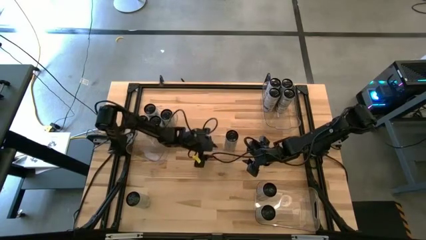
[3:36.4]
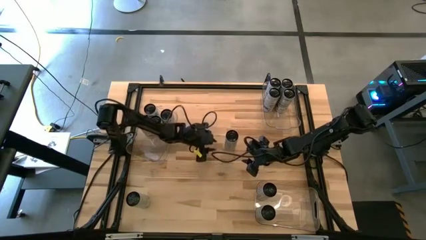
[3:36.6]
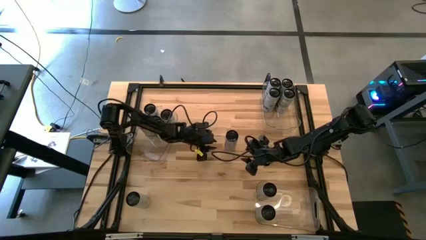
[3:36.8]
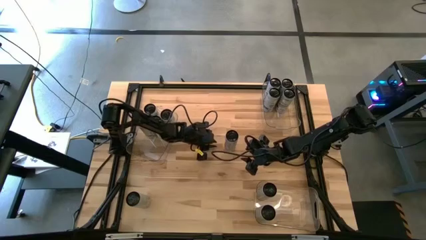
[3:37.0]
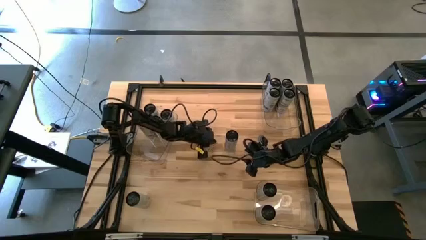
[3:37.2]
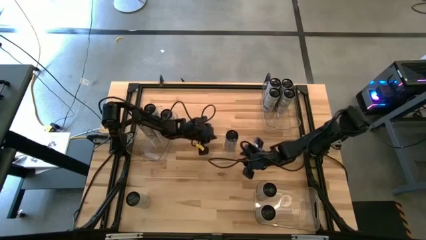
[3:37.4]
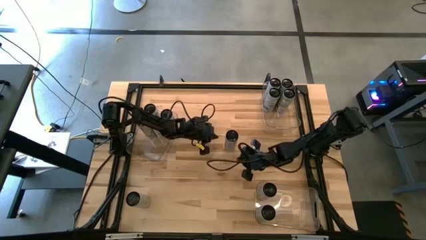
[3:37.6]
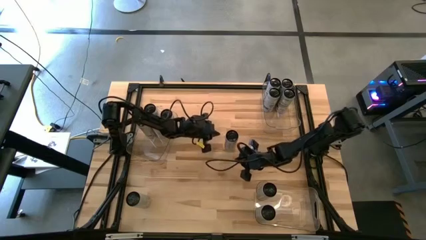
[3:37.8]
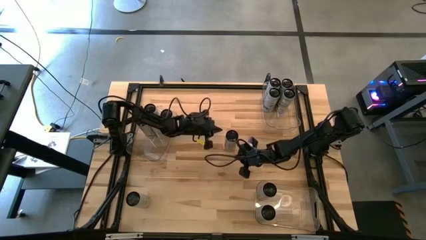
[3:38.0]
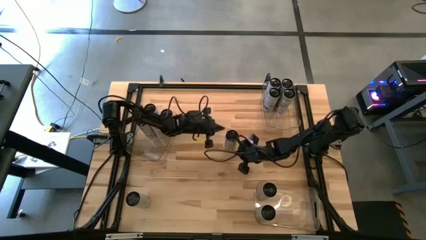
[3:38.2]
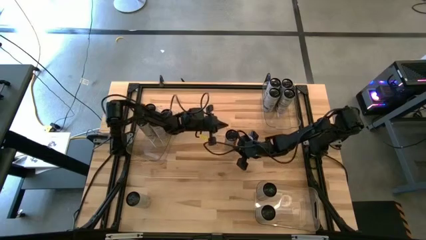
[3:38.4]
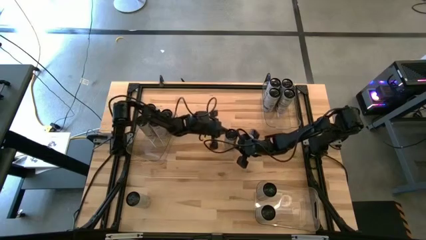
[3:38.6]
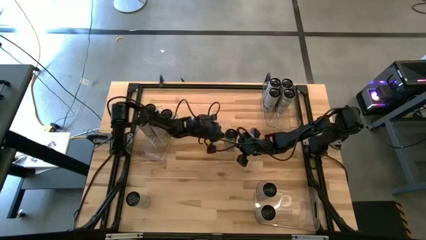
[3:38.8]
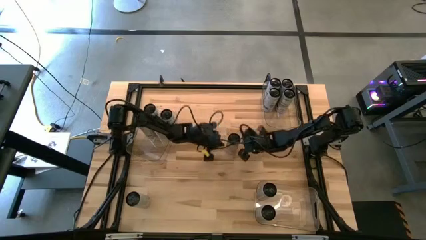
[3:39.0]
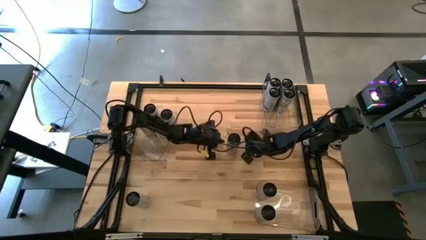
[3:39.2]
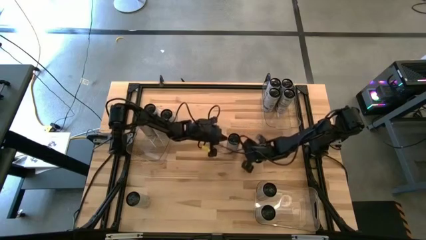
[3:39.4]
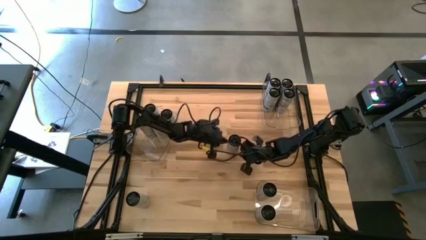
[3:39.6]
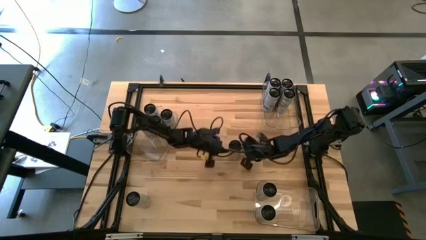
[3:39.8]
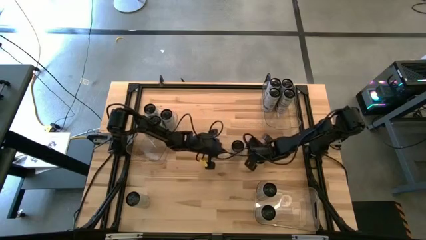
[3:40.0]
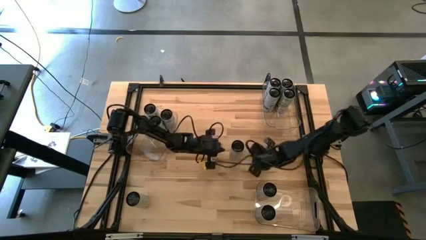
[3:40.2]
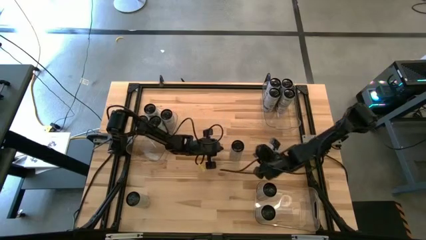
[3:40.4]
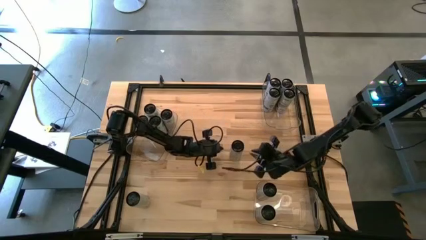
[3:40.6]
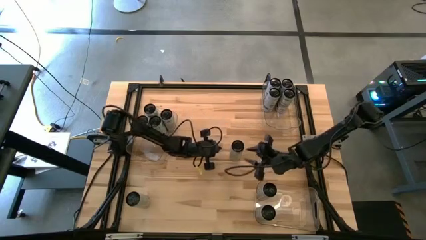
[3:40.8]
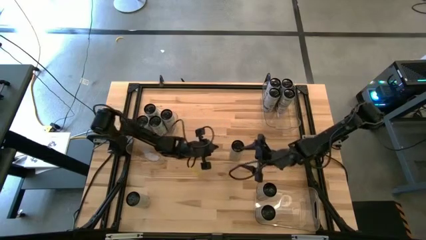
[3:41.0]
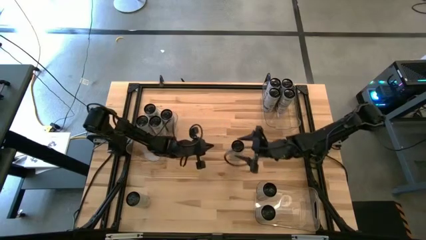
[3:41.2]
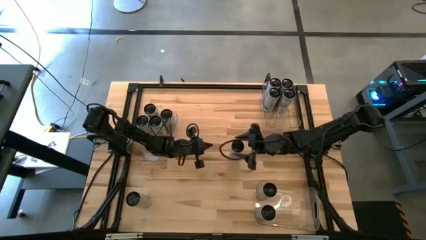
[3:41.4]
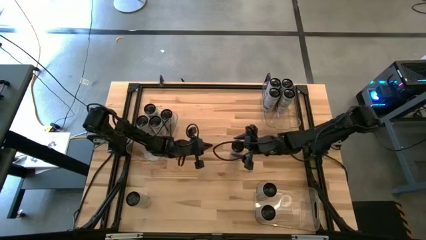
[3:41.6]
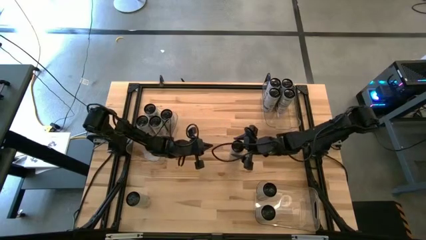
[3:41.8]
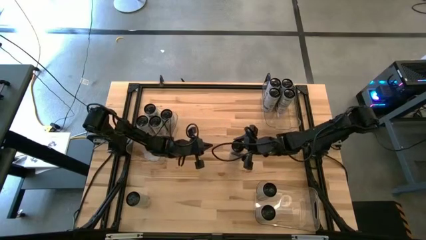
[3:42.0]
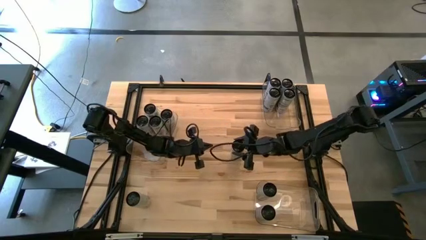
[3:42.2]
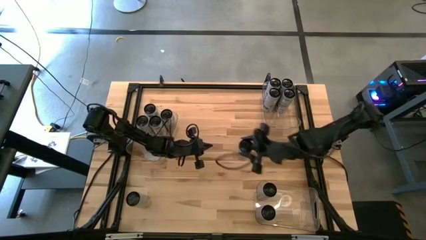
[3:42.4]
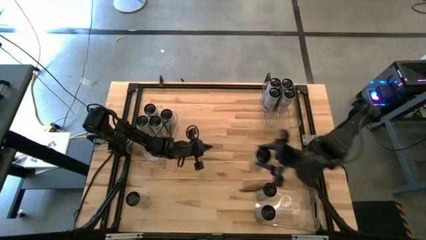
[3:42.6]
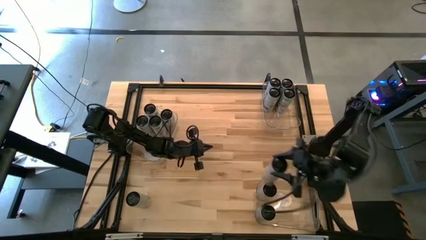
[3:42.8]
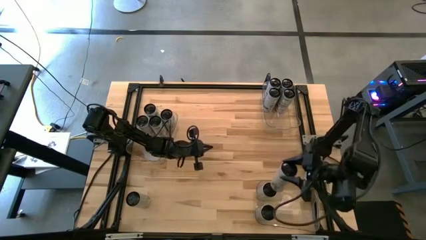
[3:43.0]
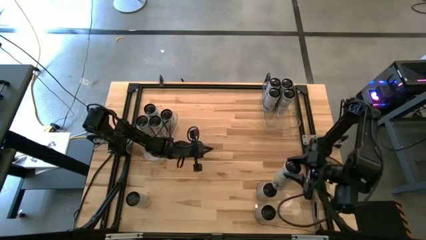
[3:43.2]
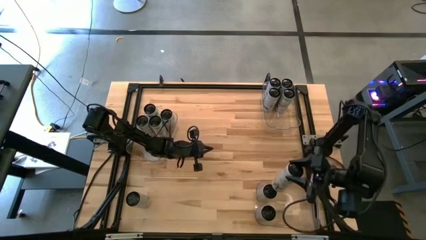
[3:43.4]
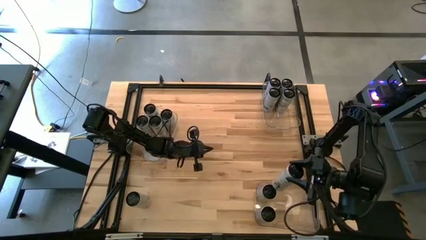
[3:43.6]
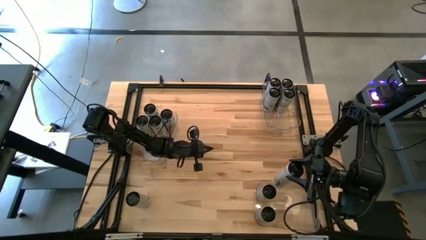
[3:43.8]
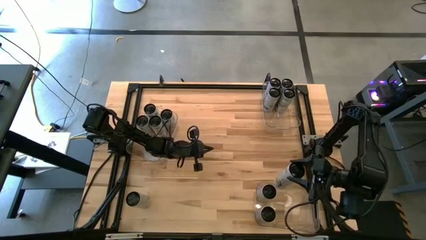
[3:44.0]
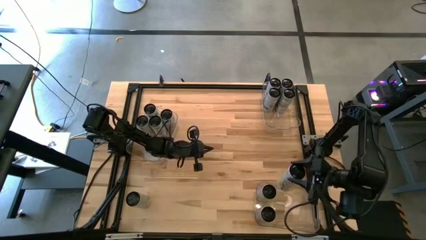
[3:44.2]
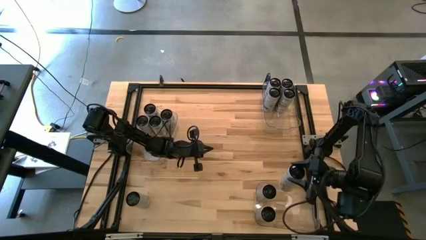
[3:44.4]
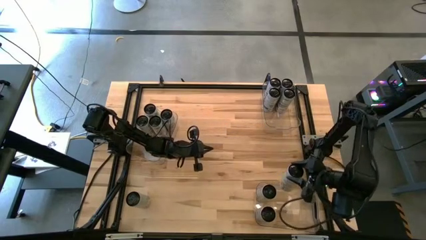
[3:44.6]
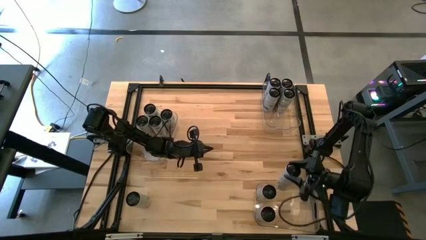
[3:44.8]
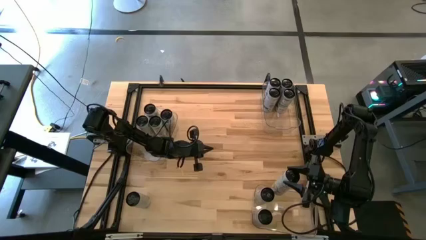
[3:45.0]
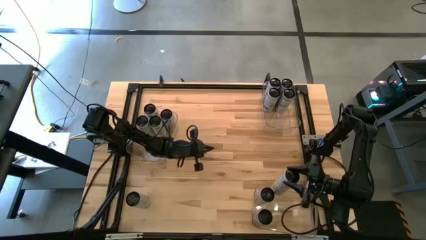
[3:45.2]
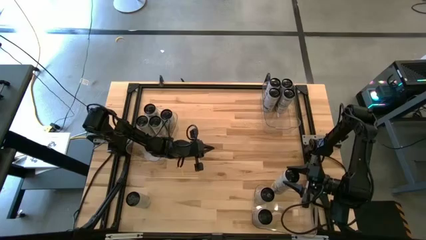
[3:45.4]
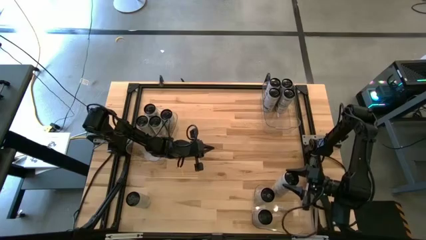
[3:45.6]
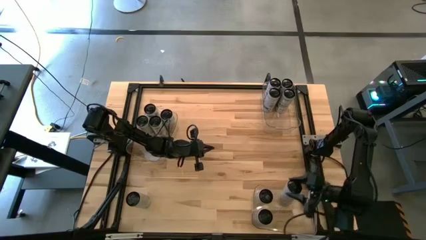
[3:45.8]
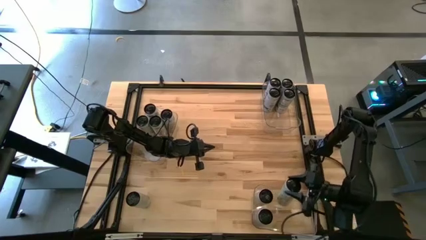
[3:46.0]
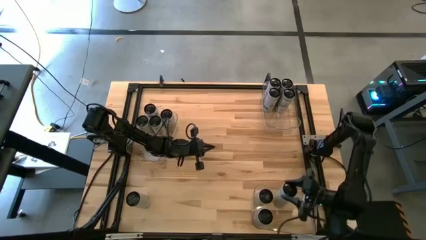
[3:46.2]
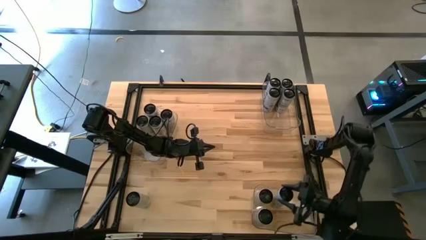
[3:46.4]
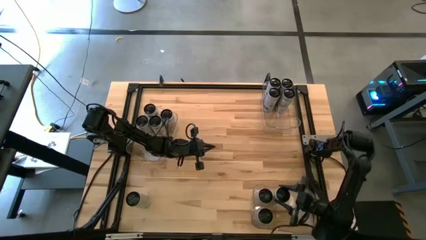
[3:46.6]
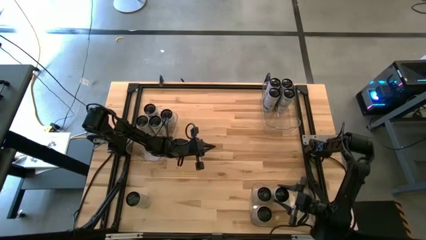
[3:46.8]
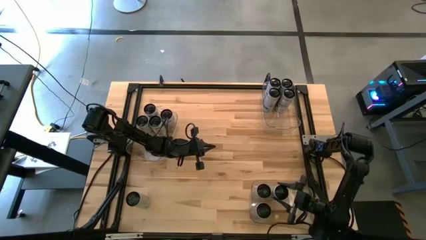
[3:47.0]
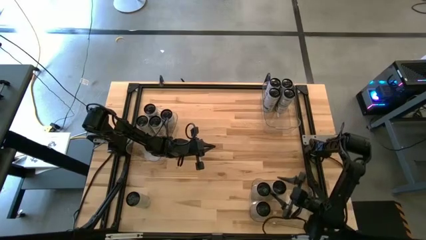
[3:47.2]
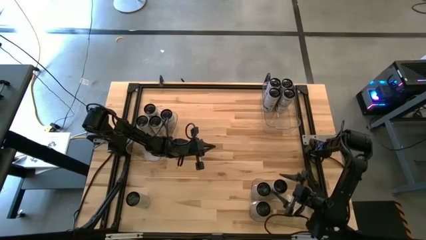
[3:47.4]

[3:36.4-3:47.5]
Task: Sort soda cans
Put the white-yellow soda can into the bottom transparent bin

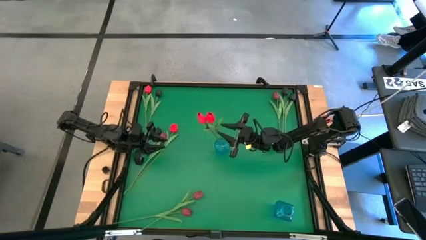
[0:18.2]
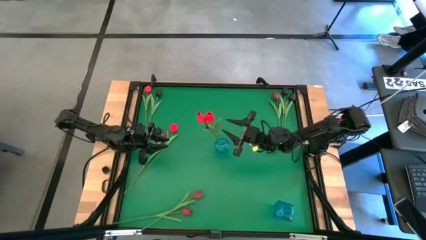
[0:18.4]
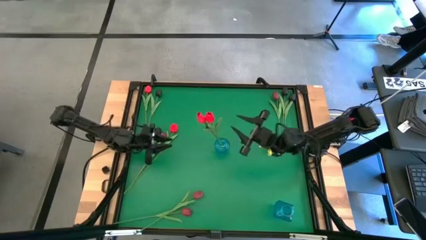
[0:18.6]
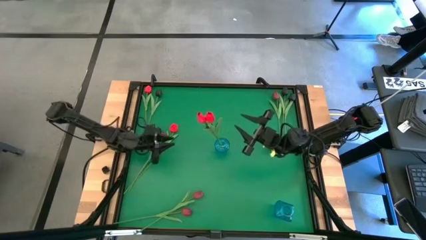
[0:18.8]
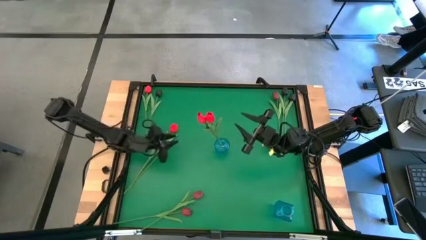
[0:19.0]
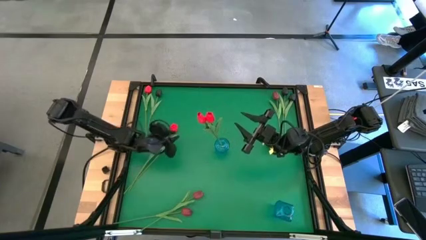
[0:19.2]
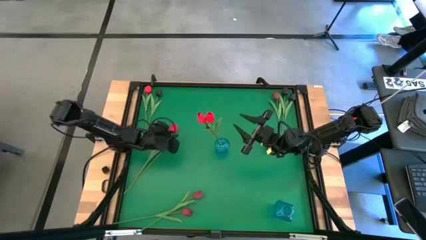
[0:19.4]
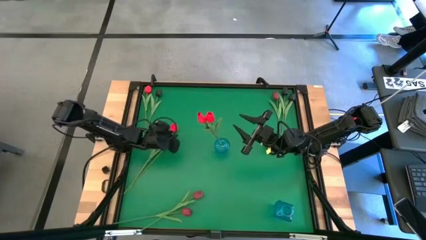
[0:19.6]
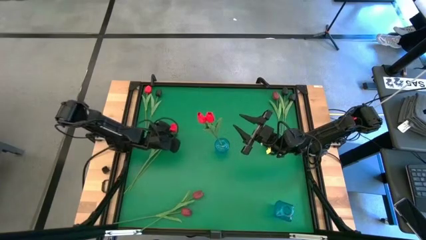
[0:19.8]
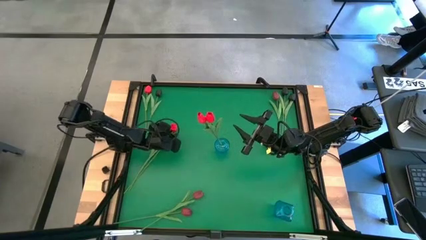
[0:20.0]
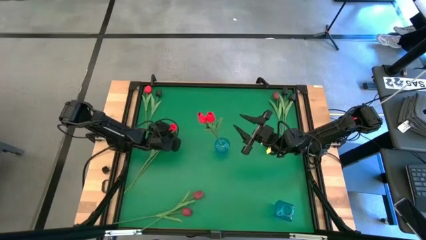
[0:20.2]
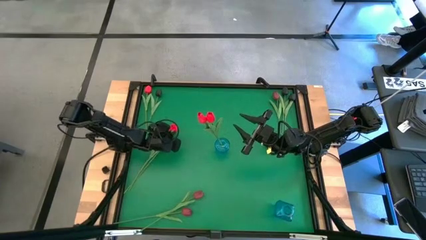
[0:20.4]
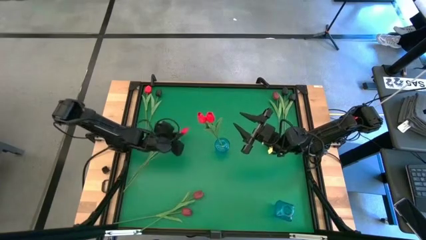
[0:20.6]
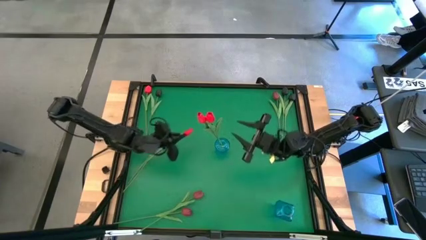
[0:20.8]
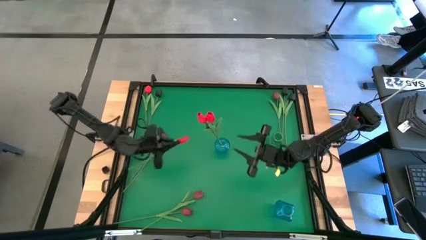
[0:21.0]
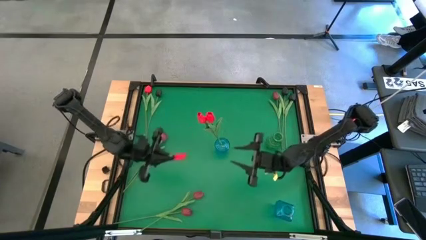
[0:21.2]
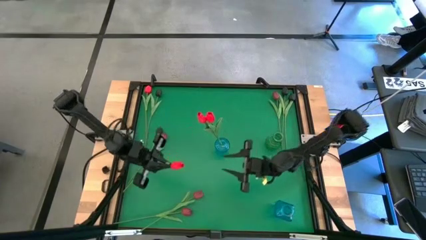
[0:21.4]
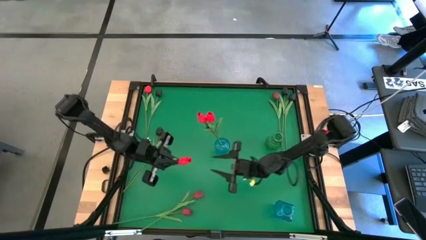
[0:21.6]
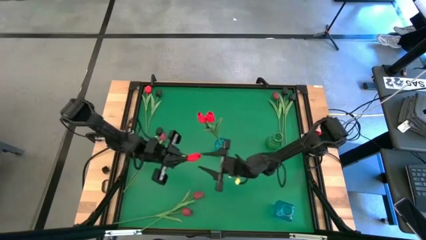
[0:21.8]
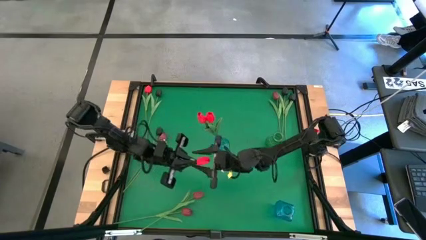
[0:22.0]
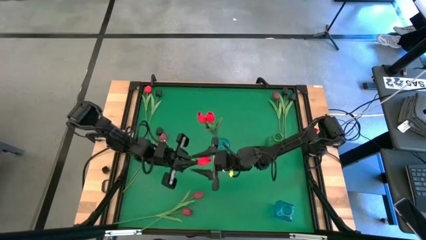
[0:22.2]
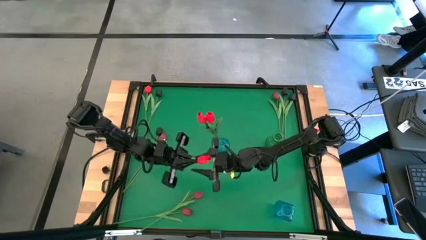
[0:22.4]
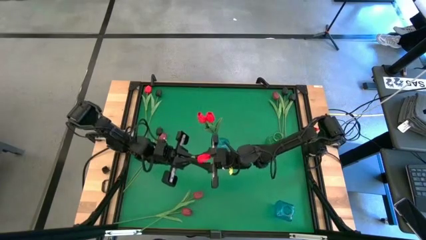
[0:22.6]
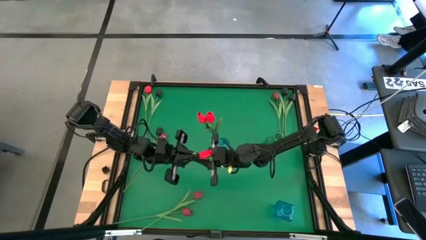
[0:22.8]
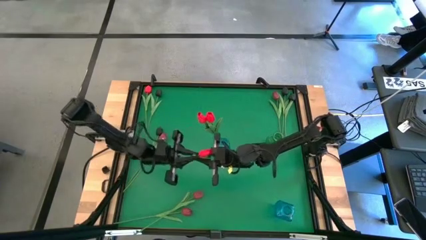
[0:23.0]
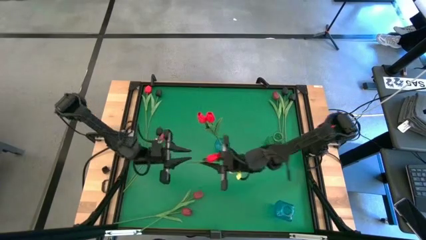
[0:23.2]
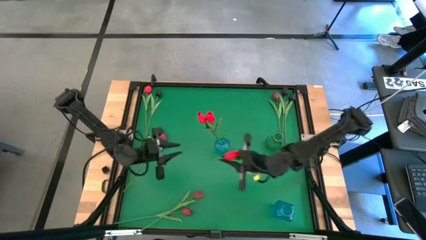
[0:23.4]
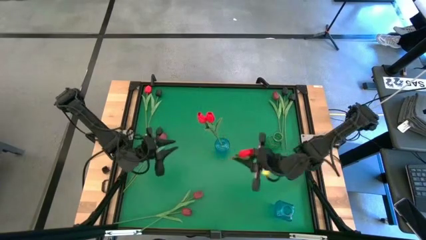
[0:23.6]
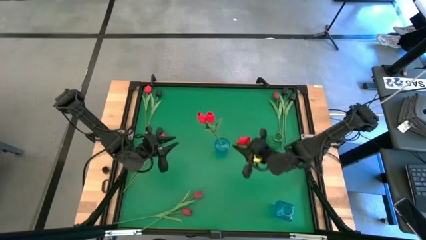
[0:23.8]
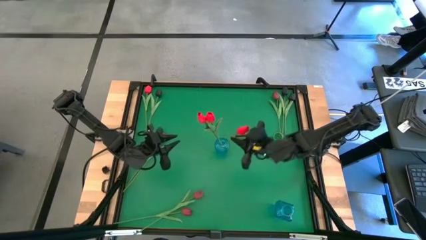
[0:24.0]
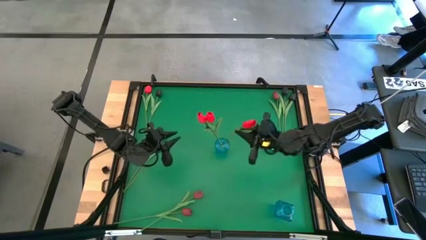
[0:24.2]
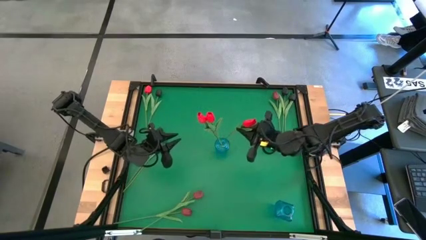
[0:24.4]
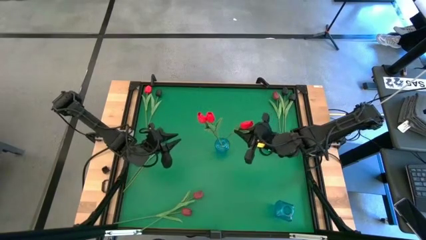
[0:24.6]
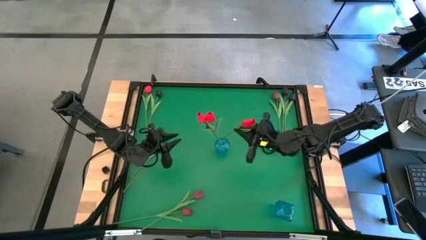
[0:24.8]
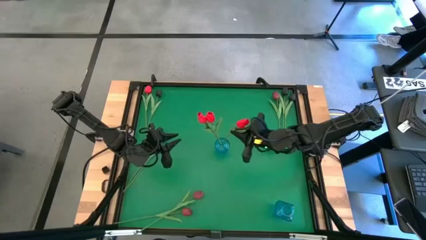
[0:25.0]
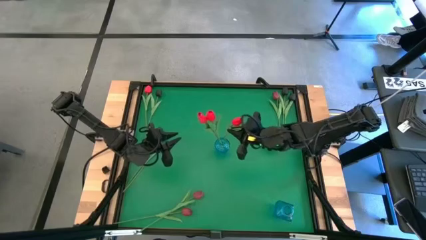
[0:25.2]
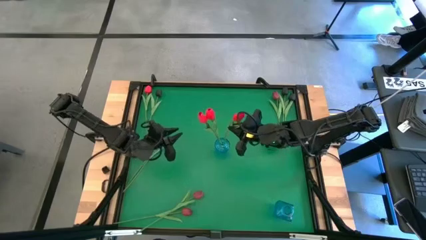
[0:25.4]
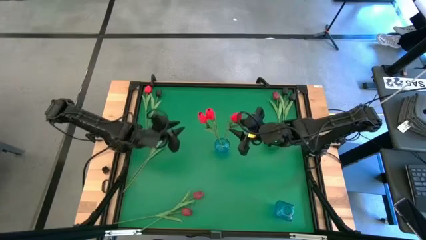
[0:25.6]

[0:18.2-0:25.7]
Task: Sort flowers into vase by color
Put the red flower in the top blue vase
